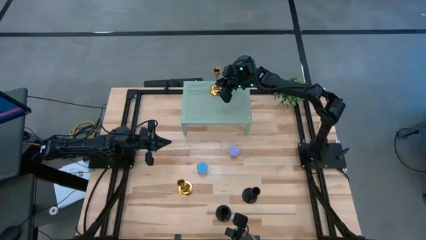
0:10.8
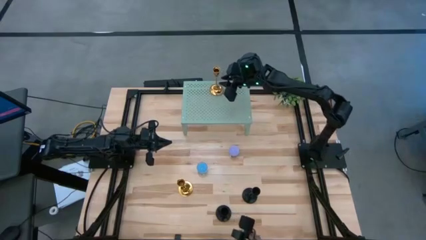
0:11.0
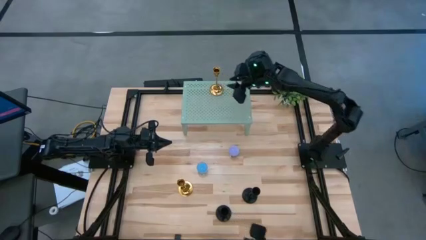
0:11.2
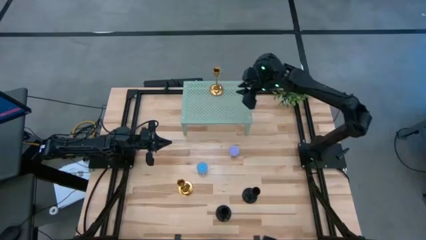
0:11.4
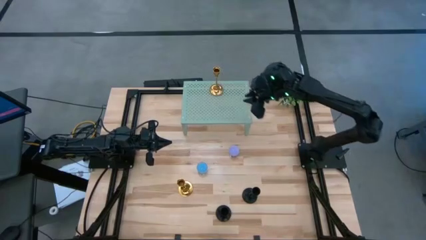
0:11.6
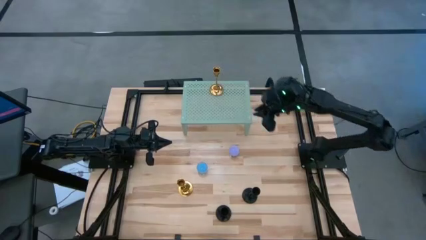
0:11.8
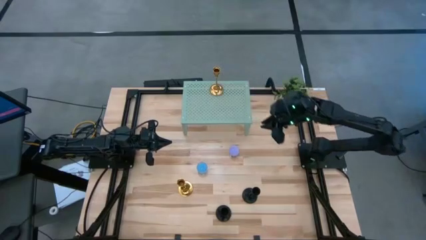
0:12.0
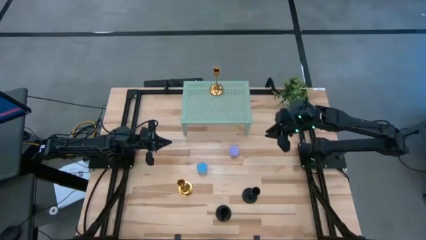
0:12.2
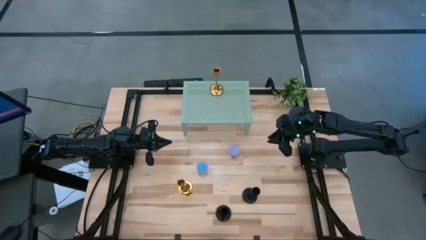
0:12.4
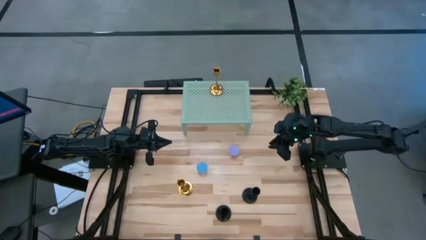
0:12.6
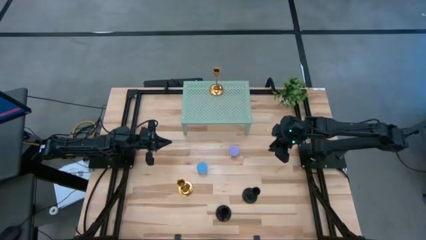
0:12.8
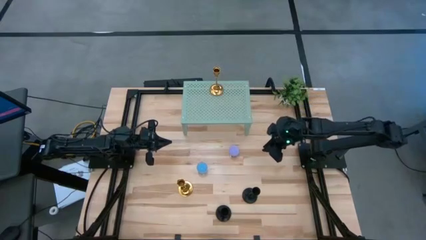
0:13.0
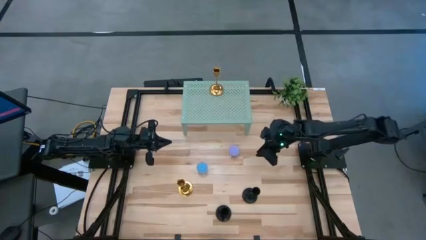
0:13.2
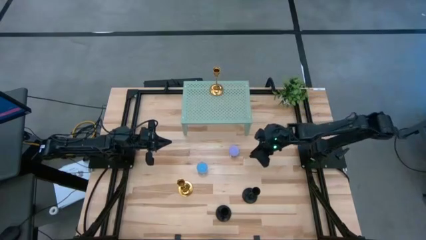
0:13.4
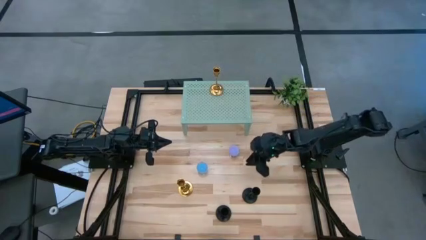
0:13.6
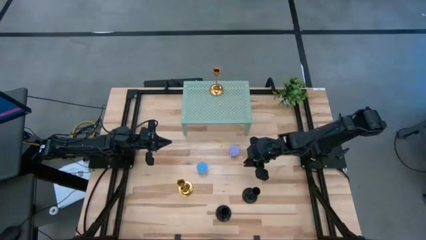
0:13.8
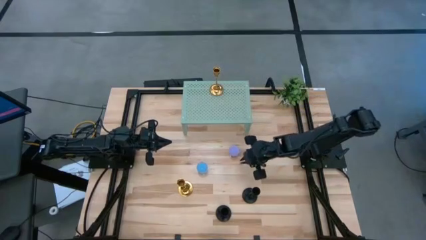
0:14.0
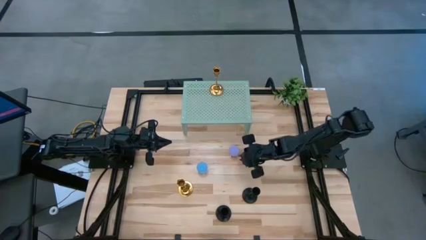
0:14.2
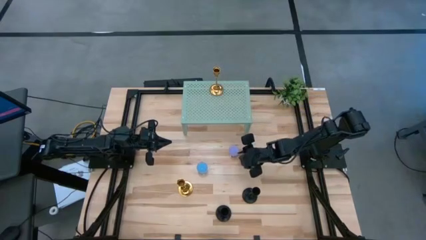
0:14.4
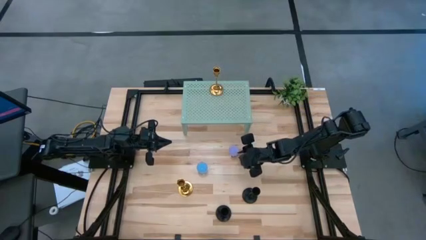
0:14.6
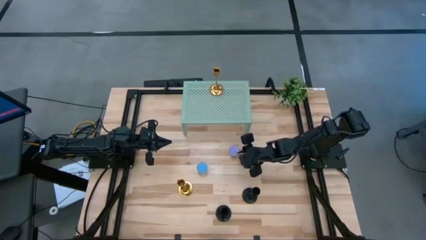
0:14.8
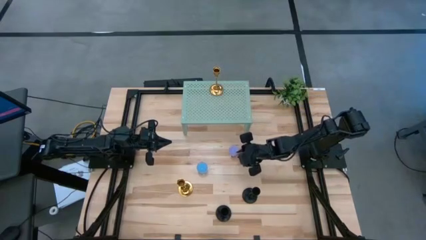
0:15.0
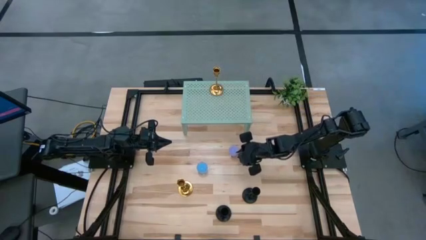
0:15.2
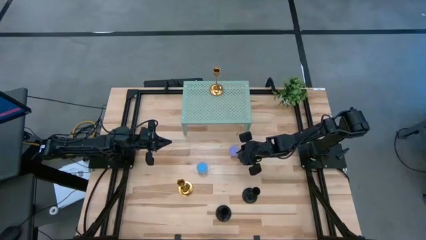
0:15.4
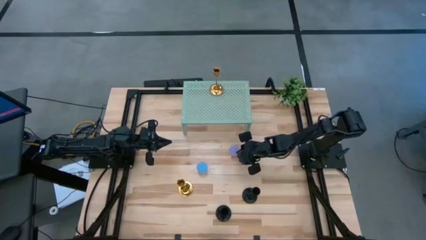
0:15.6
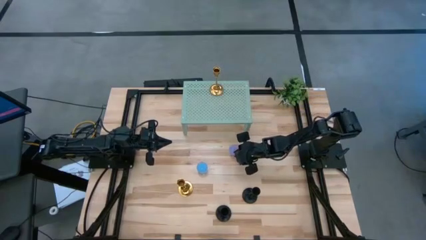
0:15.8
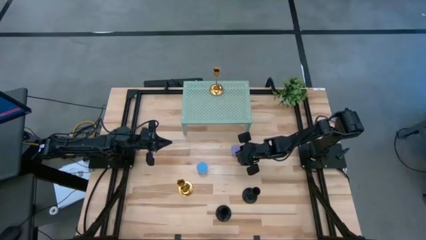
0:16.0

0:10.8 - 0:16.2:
Task: Pick & Place candle stick holders
Put the purple scented candle on the shelf

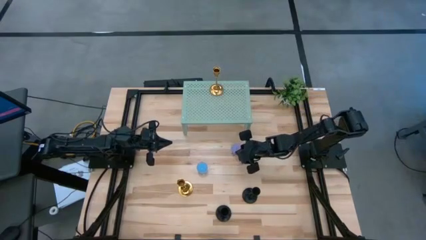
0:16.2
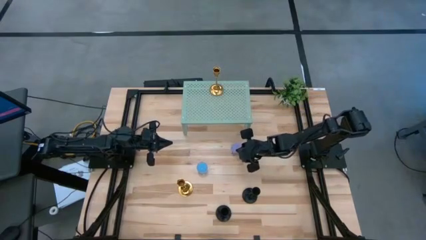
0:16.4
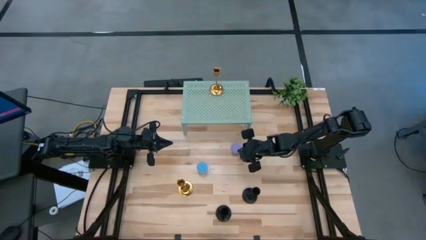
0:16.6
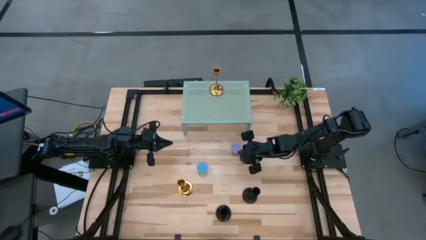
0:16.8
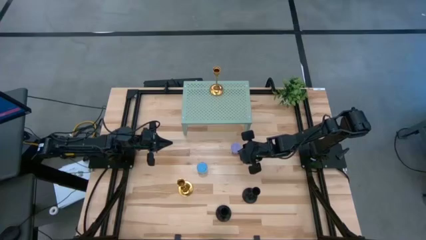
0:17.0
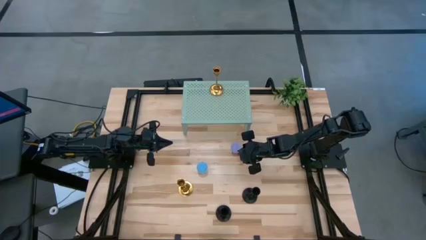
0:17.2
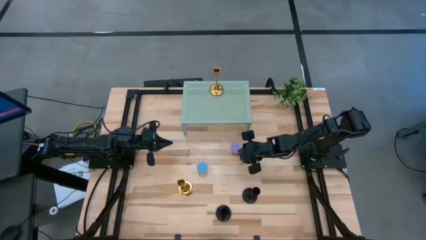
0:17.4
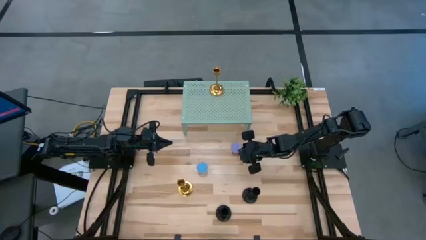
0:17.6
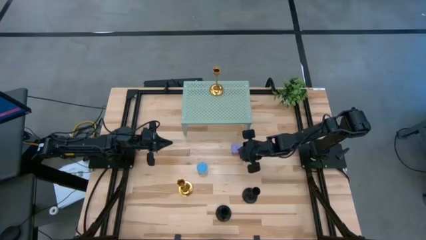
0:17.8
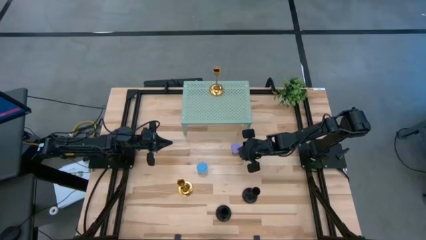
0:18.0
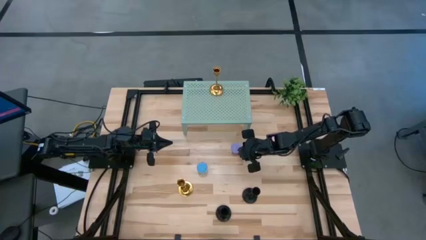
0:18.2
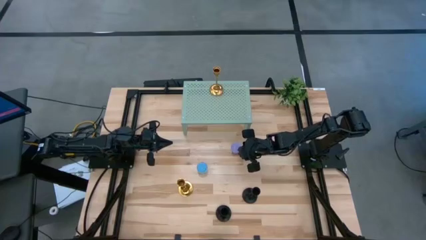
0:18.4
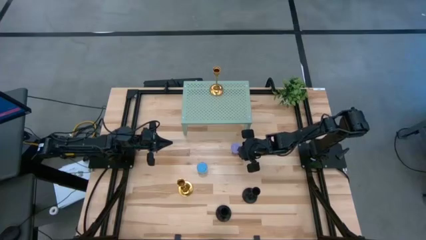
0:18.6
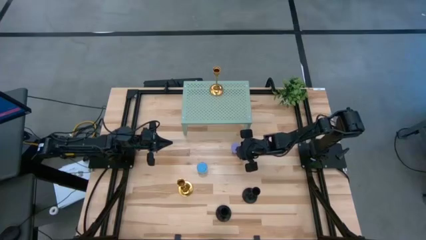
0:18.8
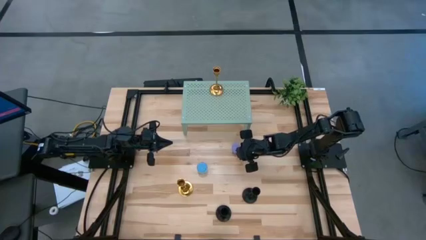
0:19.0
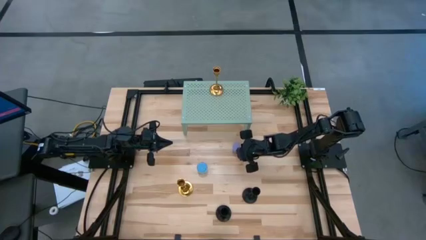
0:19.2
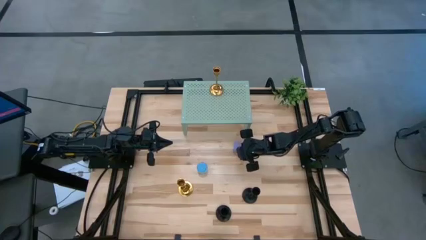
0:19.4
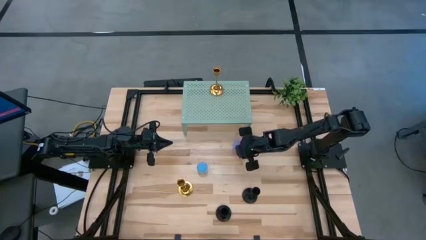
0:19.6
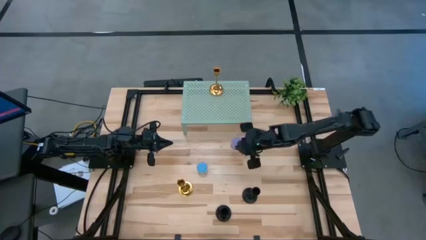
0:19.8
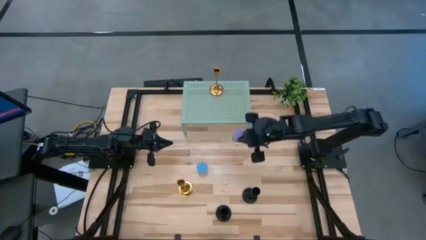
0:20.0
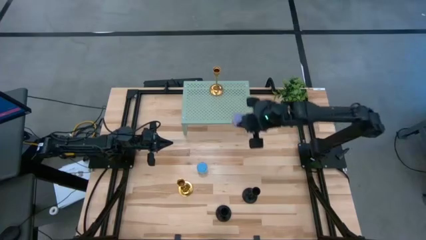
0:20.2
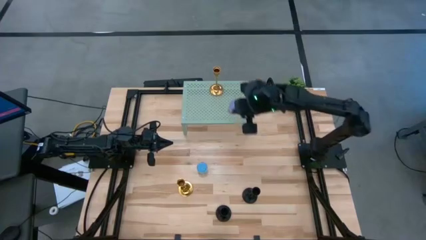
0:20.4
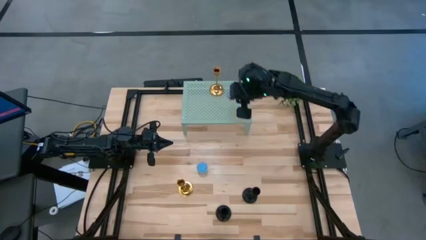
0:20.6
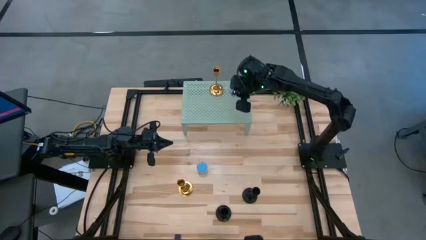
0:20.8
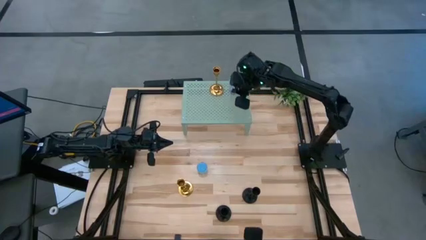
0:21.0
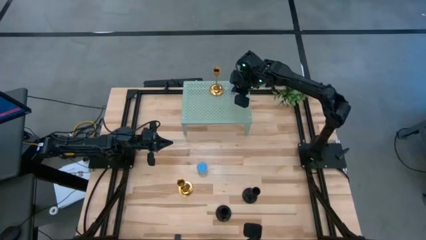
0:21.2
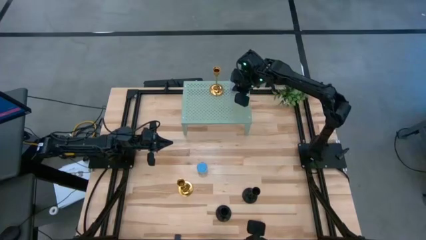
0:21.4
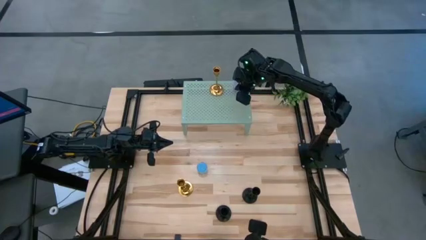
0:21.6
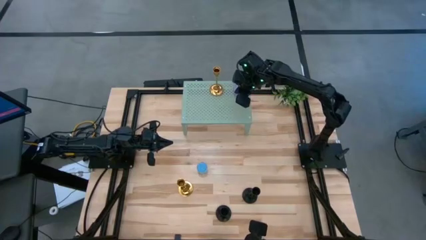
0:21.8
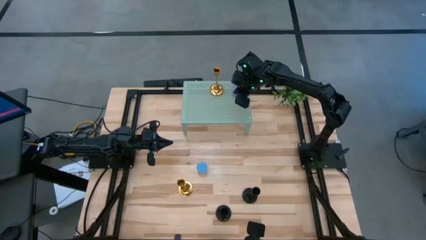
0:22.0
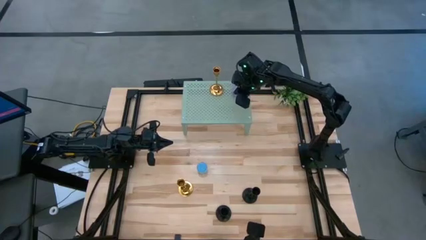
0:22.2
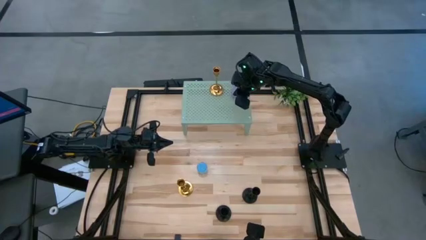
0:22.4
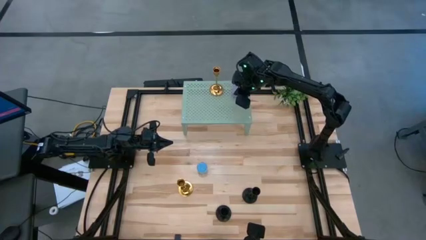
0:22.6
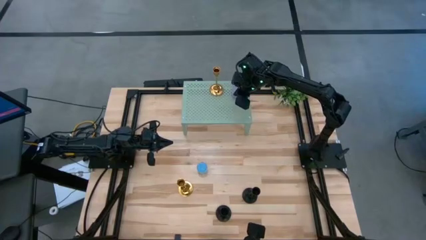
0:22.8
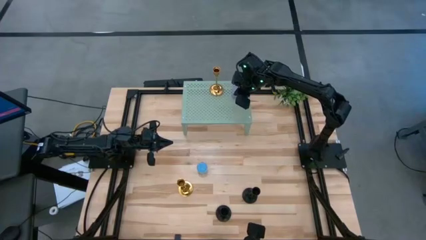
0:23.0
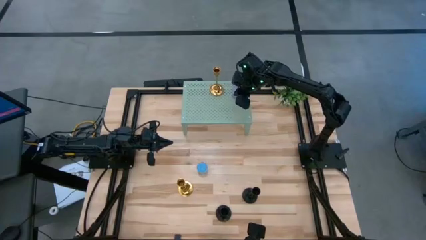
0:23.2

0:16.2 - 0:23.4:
Put the purple scented candle on the shelf

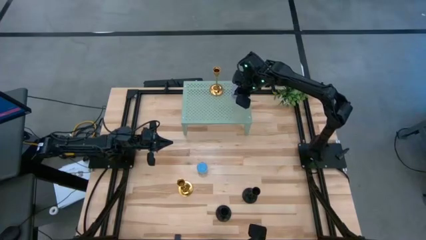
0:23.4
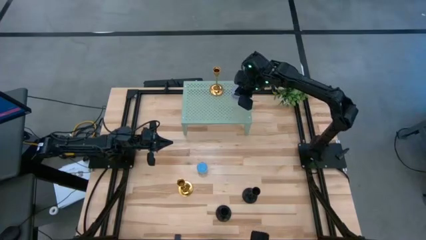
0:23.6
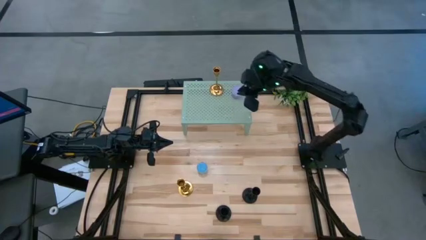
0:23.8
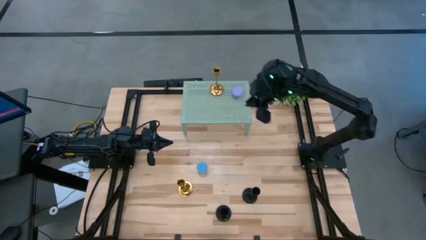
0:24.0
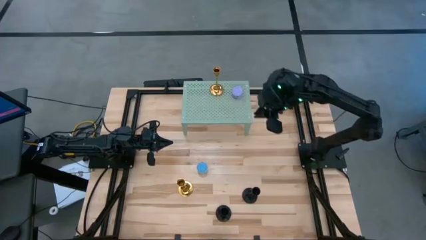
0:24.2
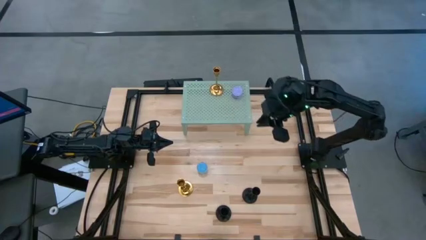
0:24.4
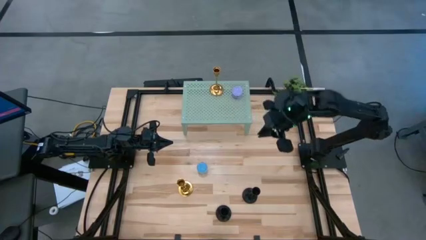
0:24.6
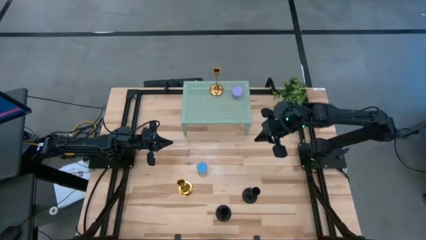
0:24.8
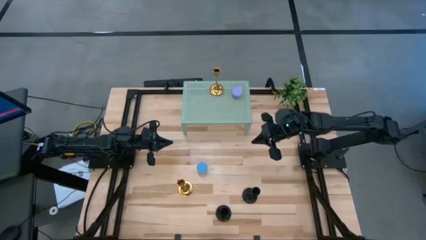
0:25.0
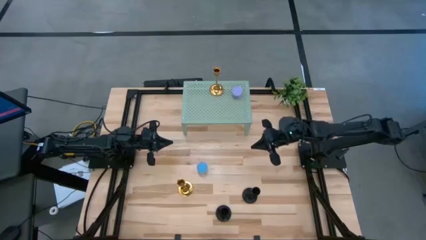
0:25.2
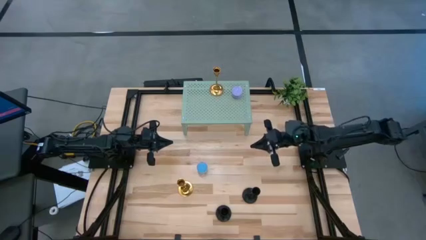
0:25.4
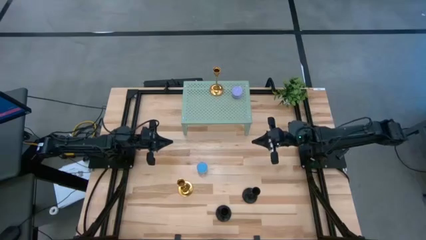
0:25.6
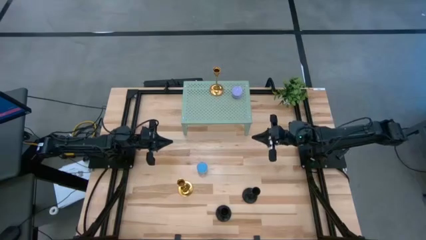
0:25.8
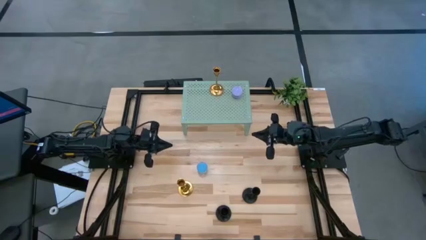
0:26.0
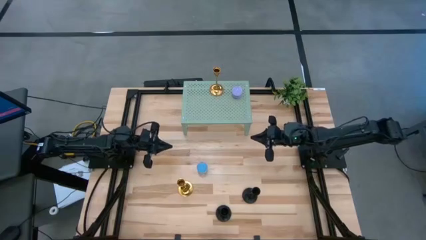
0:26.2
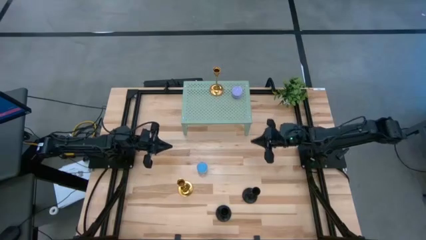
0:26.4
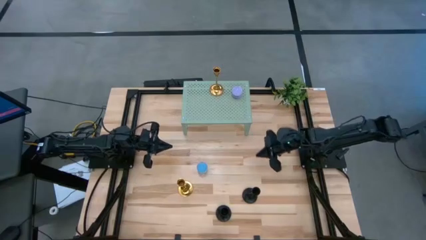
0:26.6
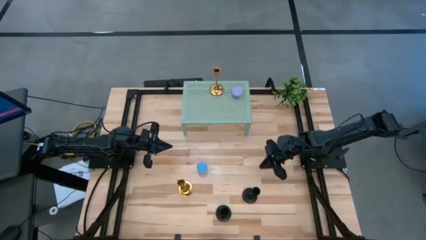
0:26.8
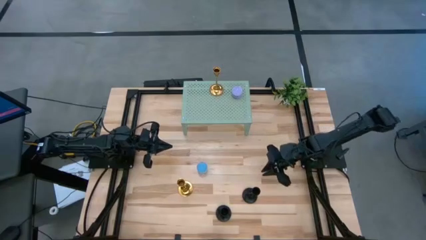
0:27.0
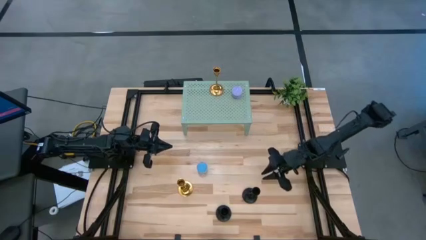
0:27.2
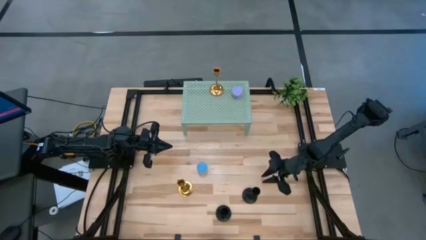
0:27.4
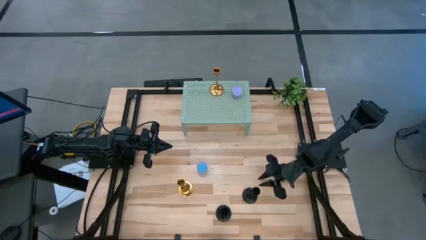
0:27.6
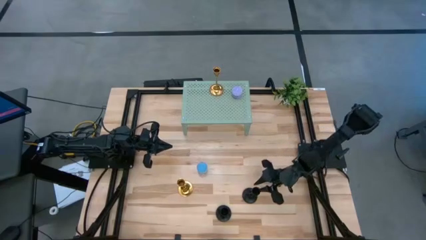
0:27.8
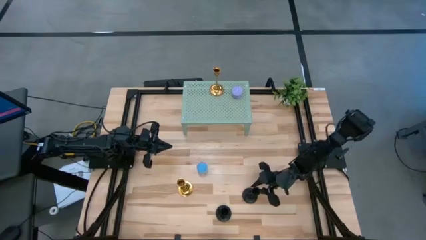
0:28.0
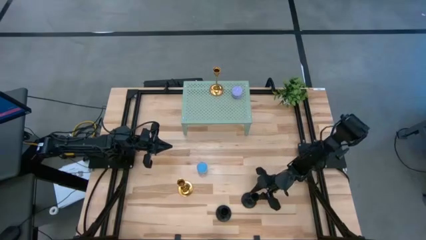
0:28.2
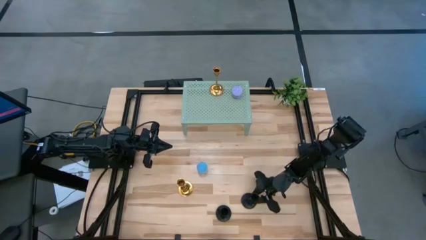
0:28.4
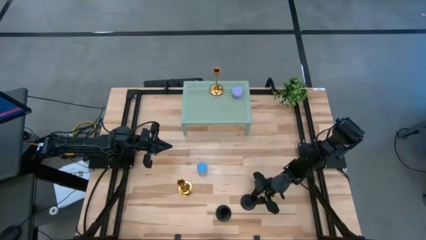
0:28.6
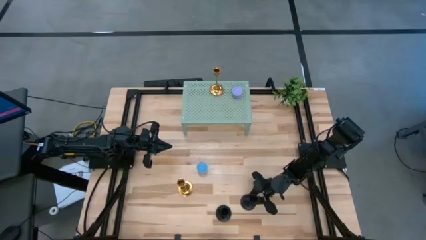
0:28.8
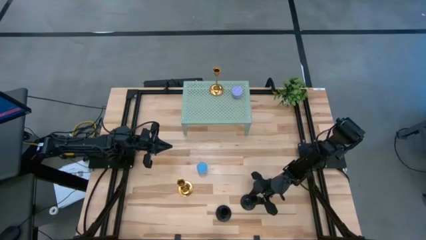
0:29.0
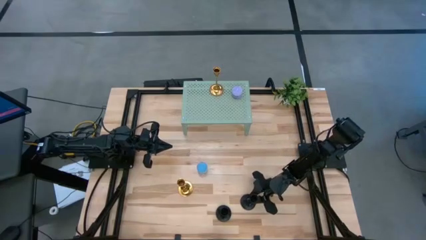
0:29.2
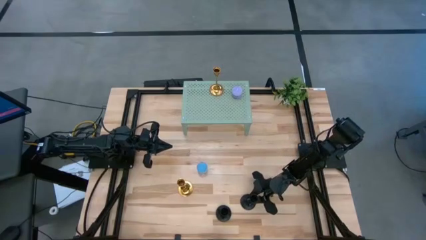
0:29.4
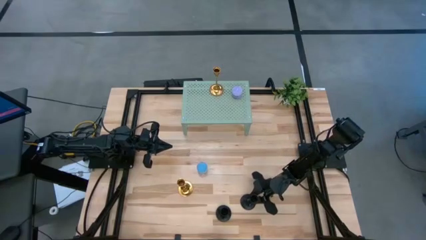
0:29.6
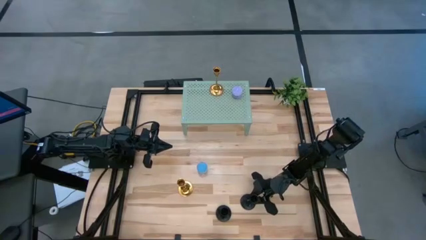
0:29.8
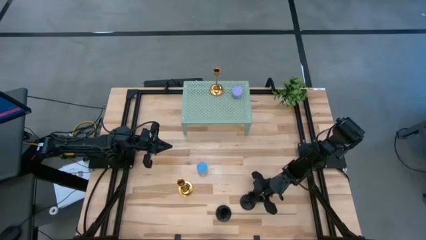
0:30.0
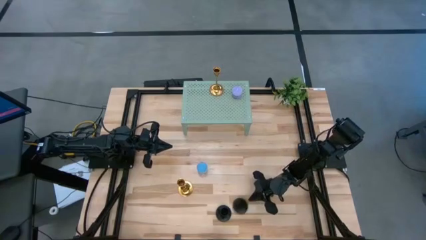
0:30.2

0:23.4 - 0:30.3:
Put the right black candle holder on the shelf
